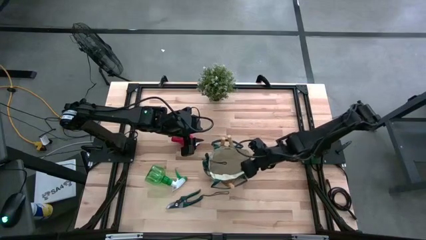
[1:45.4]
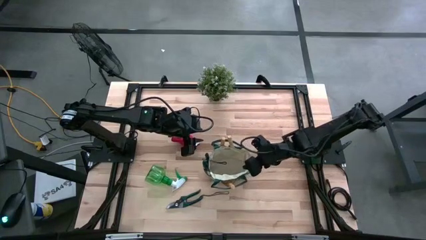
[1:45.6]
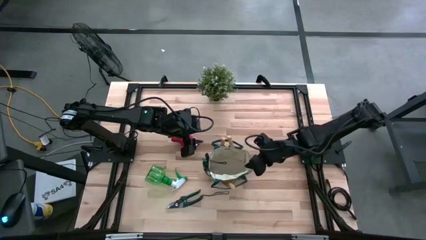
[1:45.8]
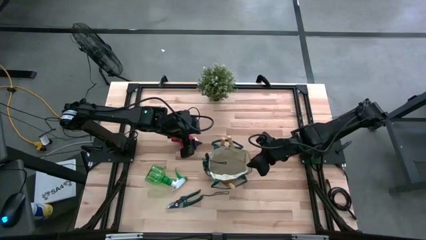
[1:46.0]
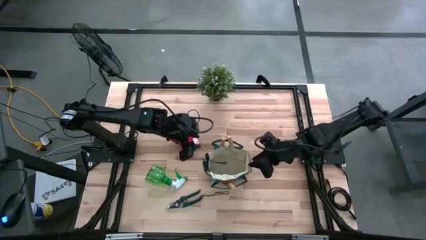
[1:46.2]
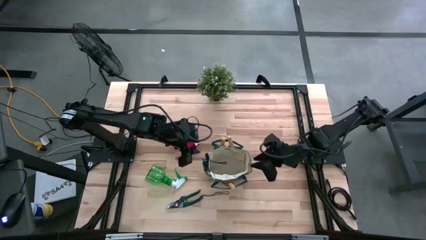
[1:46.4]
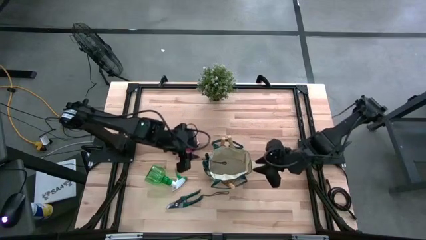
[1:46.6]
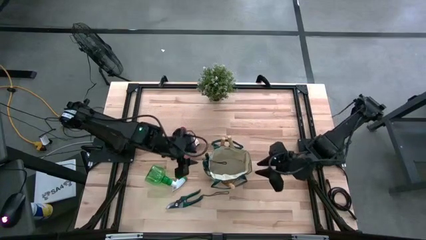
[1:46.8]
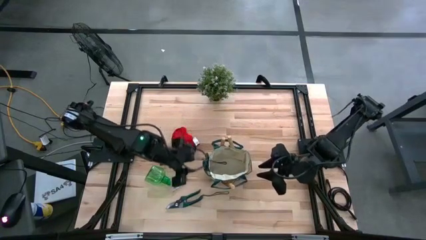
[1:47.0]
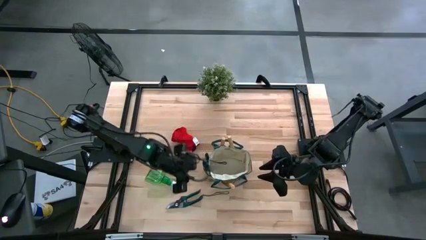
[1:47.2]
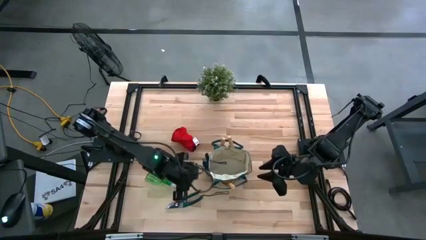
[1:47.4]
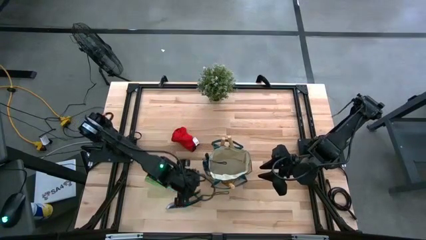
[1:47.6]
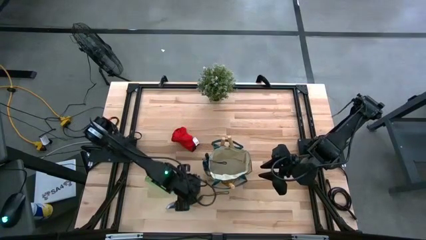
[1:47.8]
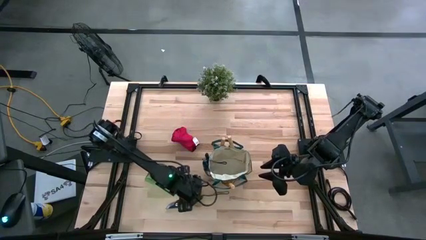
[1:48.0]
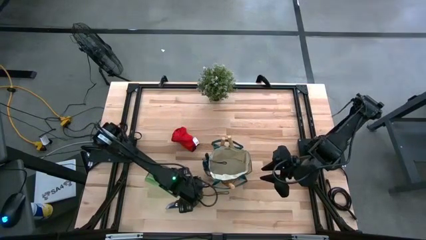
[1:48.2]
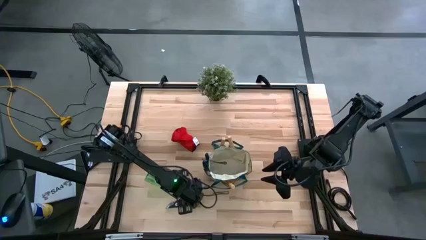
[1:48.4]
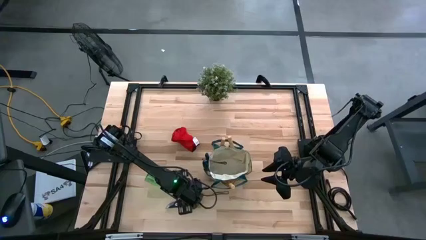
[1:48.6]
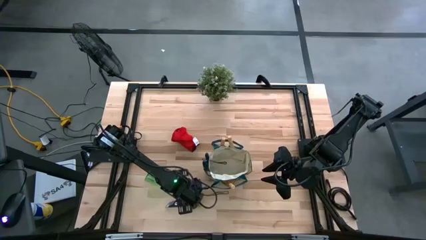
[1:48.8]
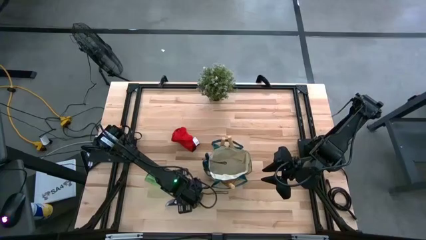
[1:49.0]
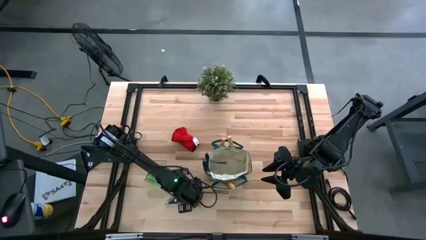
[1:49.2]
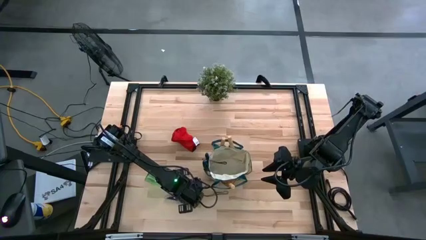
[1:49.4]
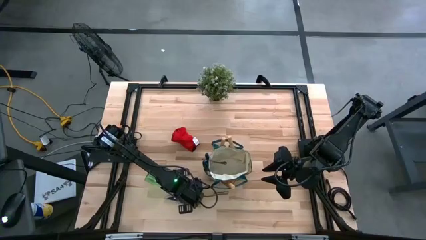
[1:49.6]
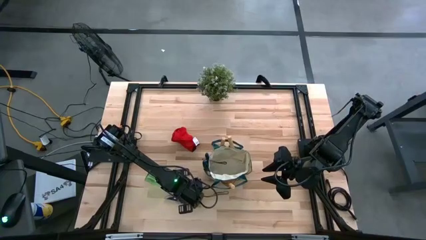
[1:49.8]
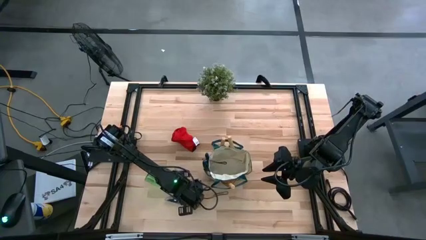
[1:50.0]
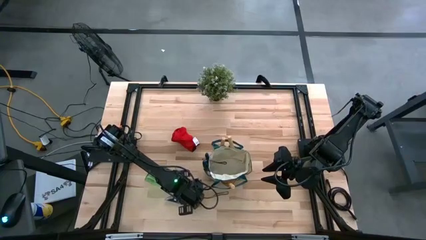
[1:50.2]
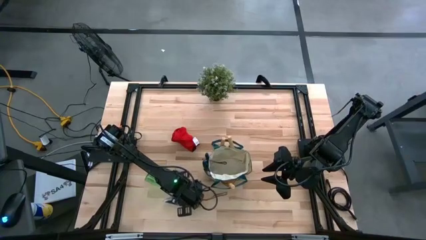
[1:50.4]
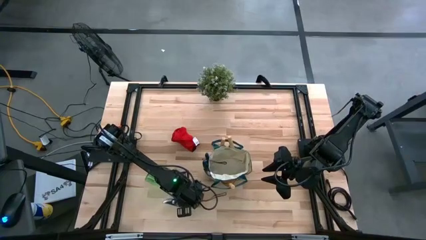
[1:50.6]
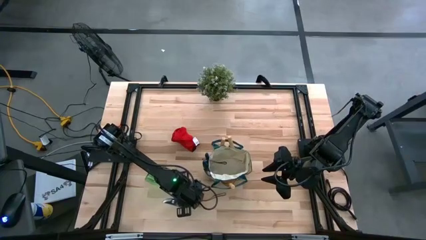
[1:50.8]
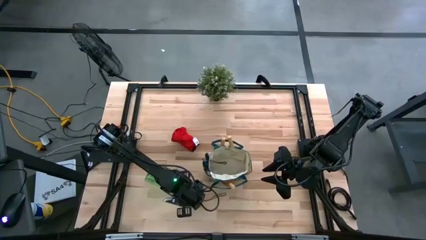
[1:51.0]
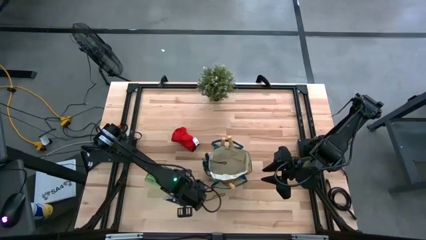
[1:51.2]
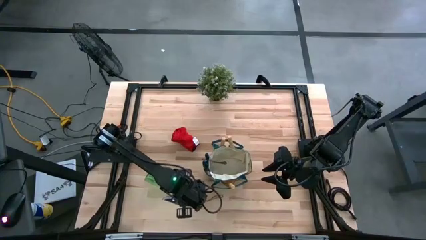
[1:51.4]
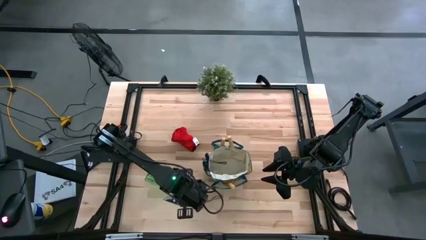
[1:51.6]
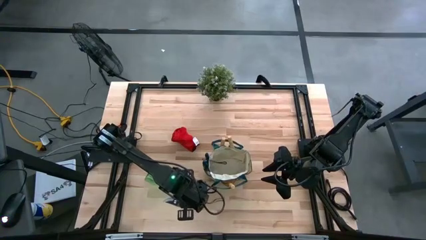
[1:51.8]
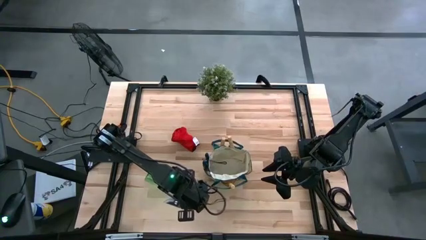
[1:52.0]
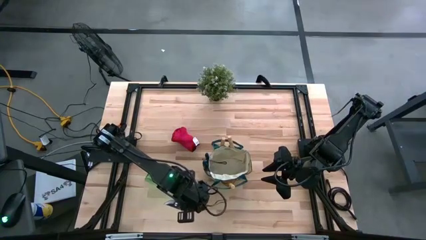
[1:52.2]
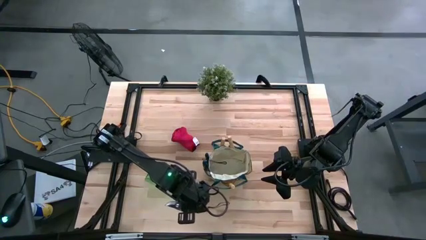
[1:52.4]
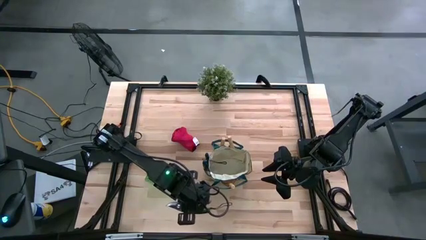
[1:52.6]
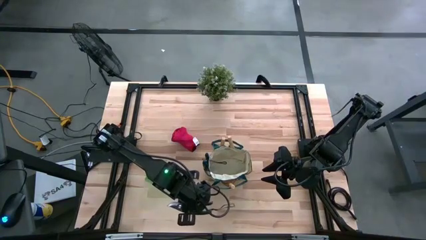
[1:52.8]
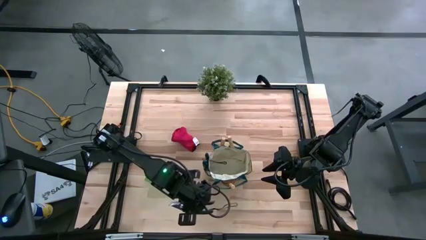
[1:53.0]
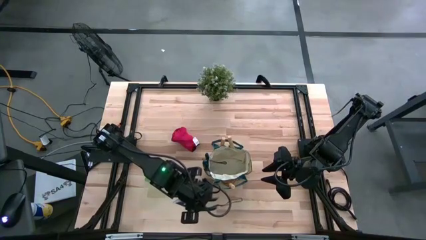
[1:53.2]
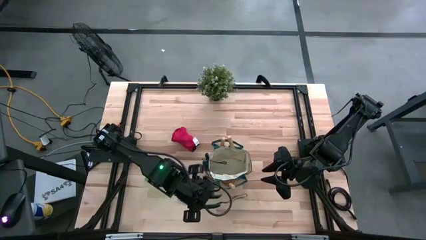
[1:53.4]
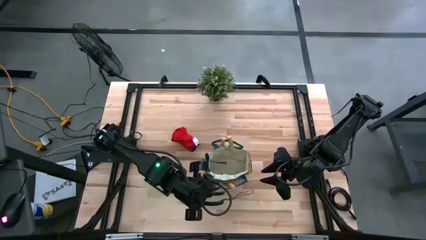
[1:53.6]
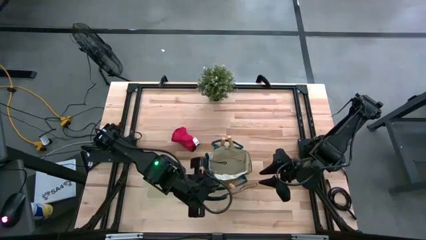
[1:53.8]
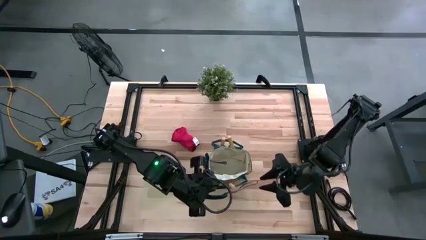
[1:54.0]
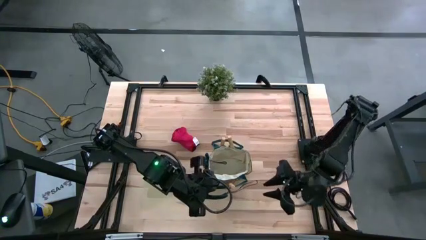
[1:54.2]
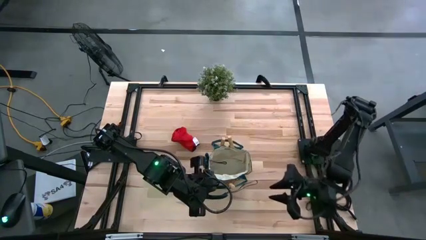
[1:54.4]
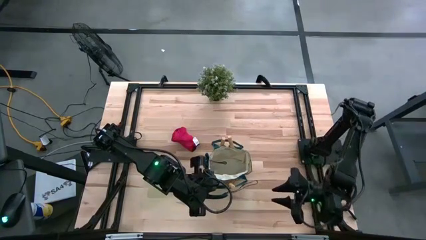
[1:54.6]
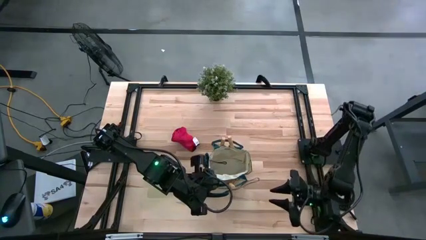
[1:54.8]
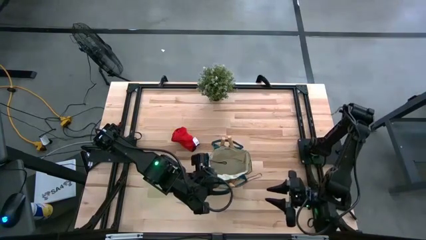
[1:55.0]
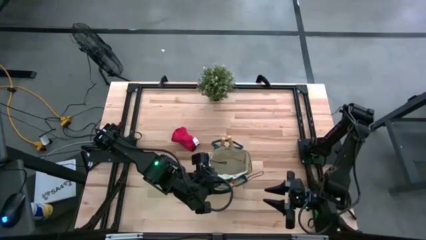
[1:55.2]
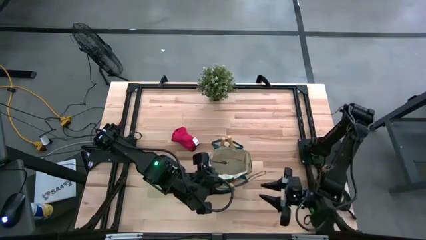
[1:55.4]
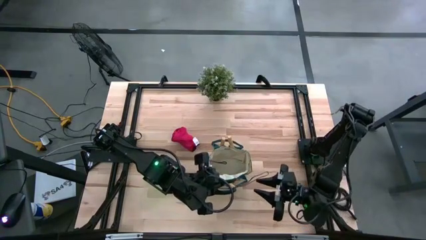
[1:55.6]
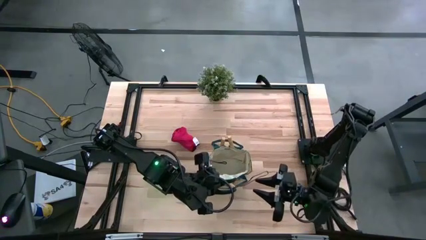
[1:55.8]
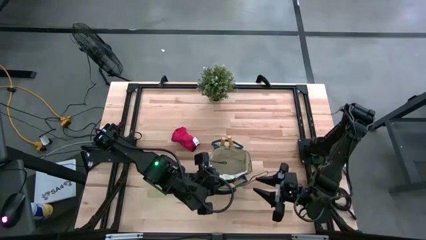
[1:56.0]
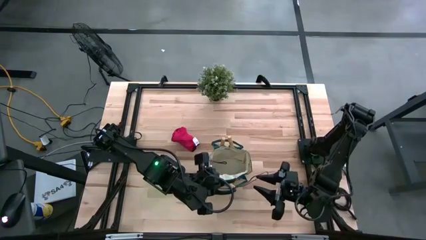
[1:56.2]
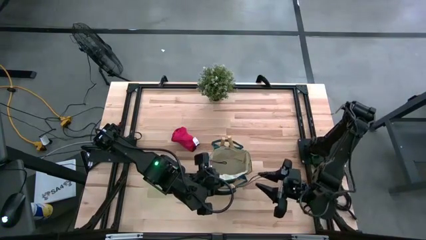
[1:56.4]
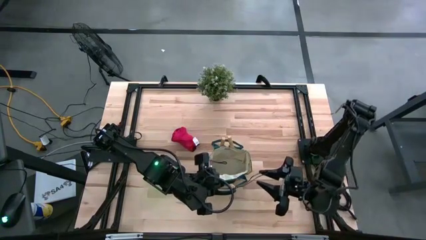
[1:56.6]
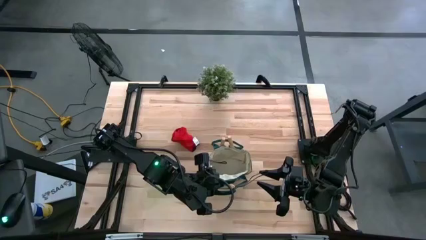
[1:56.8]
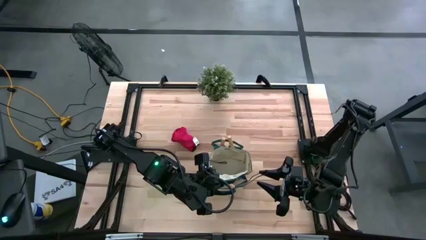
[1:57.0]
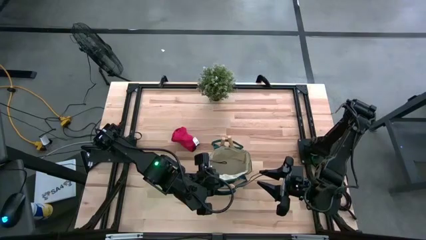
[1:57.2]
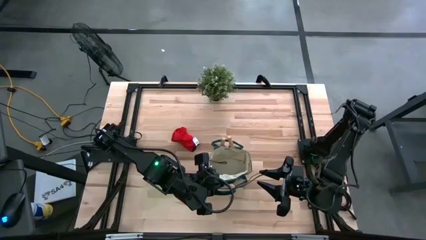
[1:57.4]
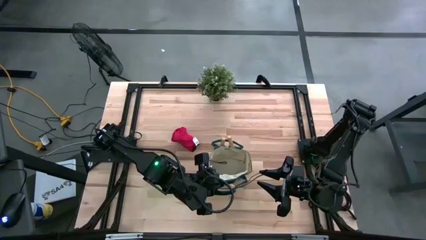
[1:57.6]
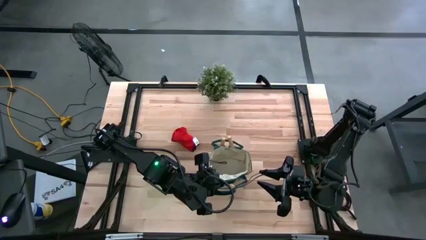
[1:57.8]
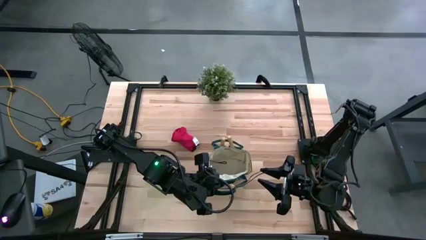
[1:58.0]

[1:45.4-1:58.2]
Task: Pick & Place Garden tools in Gardening bag
Put the shear scissors into the gardening bag

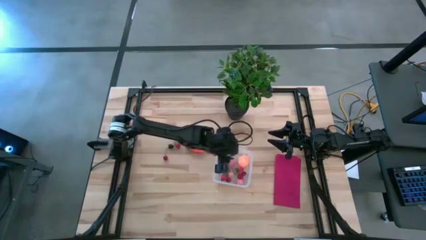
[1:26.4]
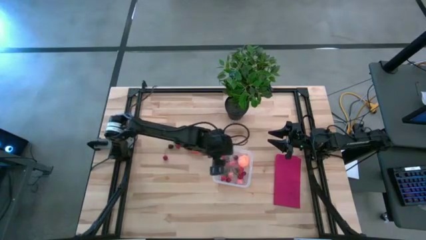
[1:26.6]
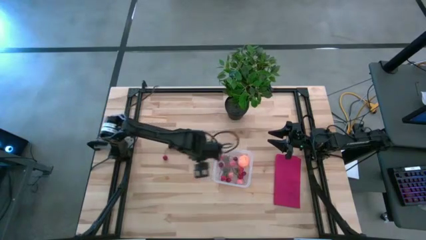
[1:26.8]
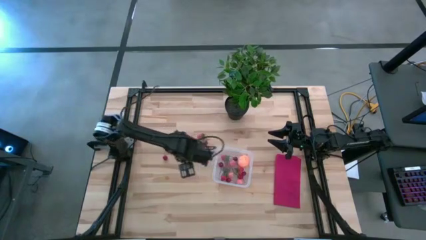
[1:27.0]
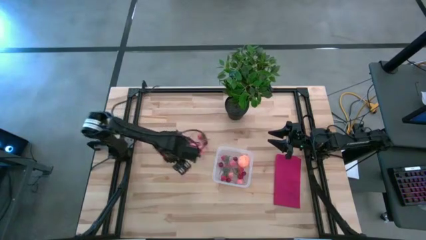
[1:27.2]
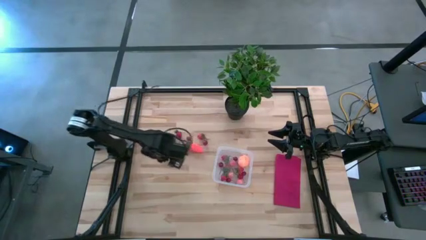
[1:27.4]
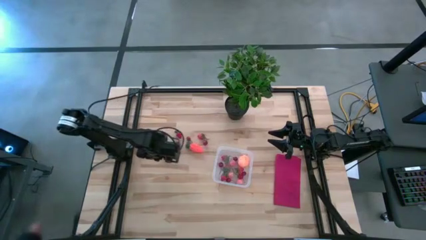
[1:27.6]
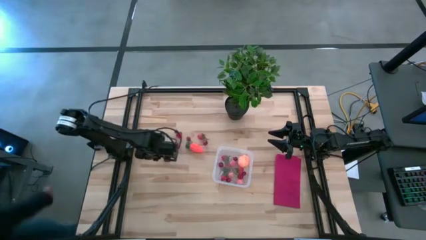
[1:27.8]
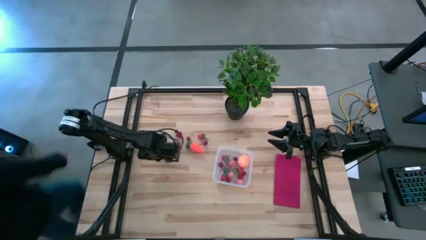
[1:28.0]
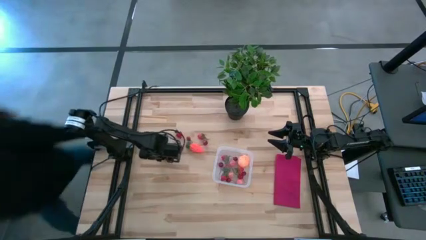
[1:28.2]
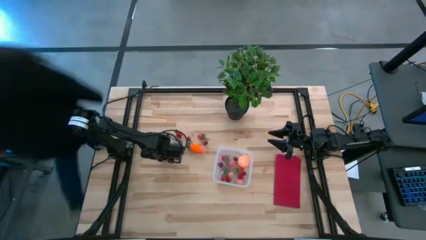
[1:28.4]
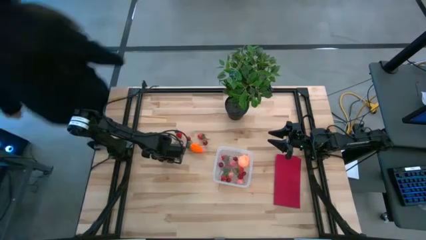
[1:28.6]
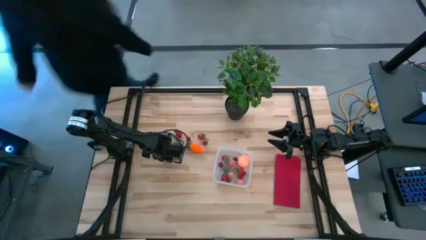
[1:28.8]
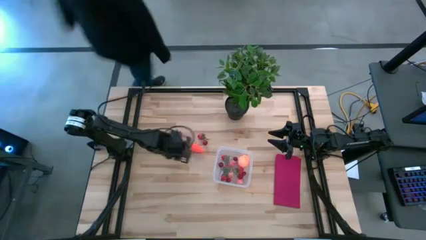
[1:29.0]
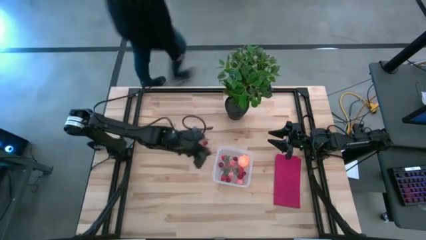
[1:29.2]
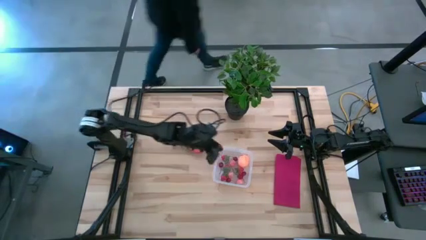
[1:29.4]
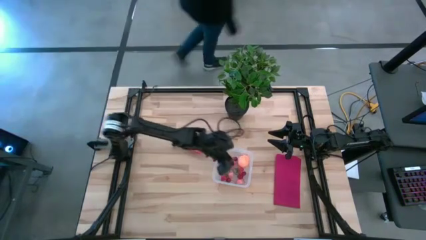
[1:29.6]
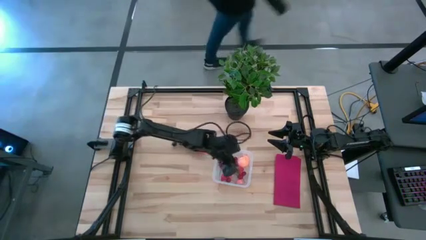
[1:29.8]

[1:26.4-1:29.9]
Task: Pick and placing Produce into tupperware
Put the red cherry into the transparent bin
